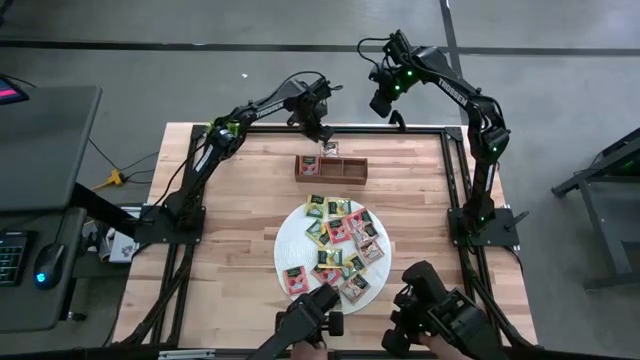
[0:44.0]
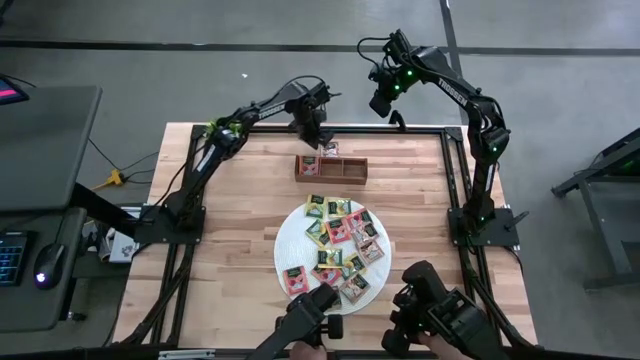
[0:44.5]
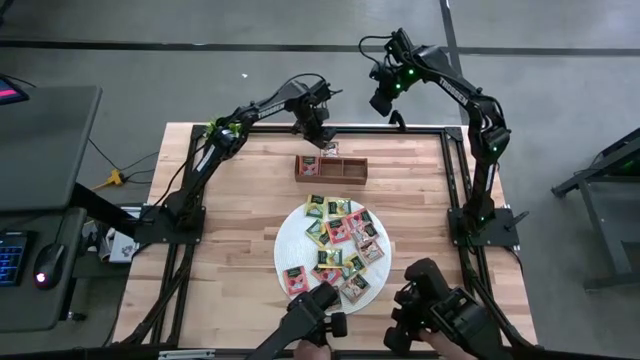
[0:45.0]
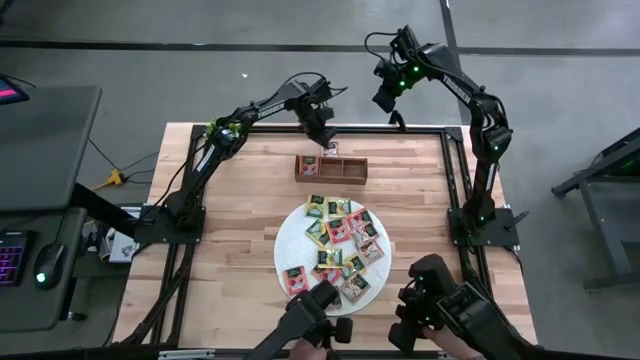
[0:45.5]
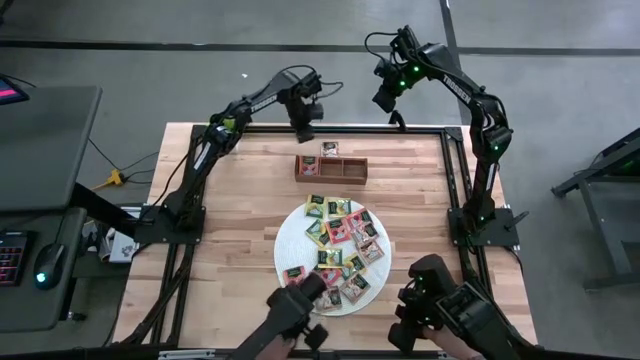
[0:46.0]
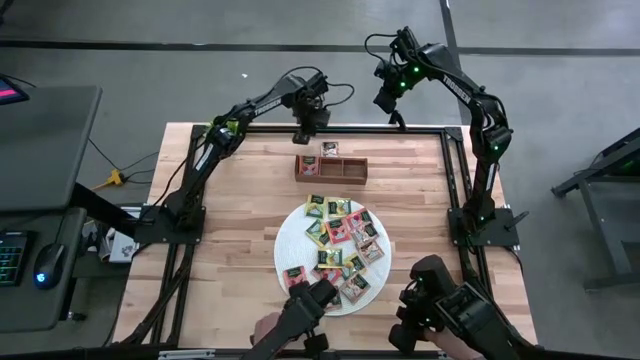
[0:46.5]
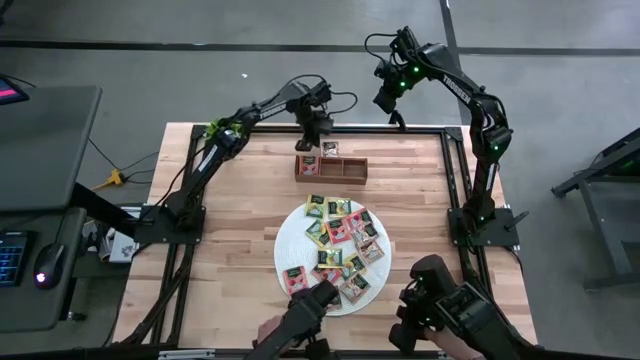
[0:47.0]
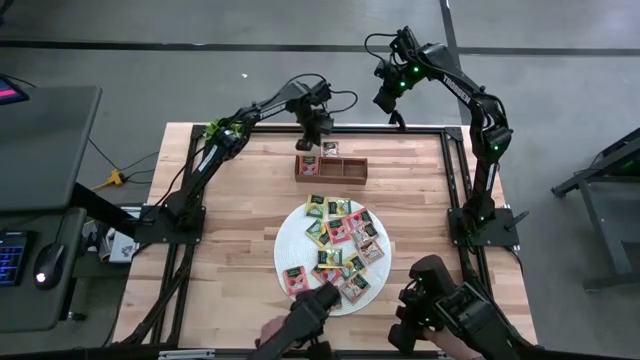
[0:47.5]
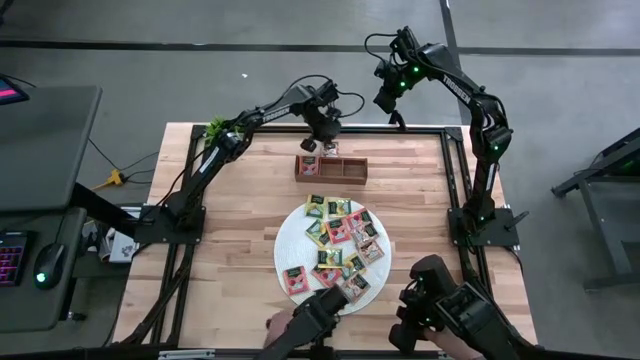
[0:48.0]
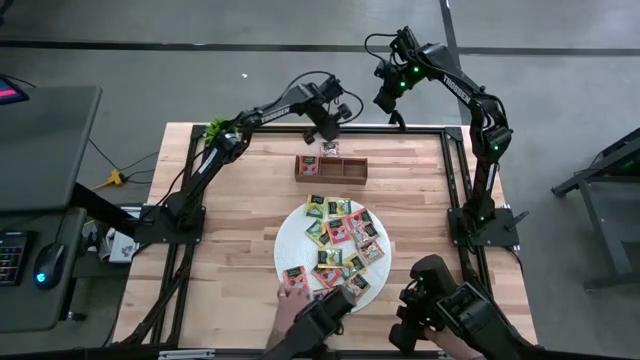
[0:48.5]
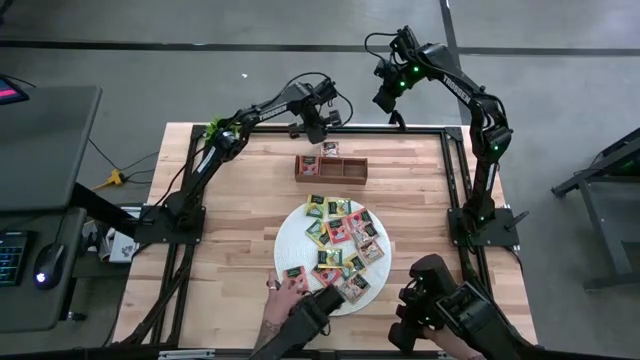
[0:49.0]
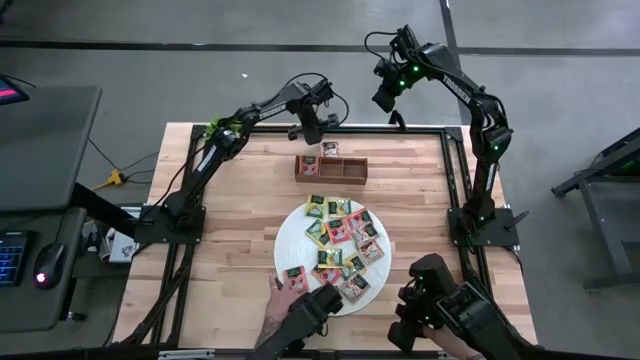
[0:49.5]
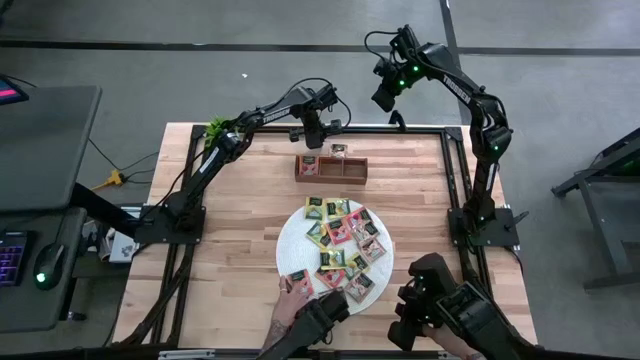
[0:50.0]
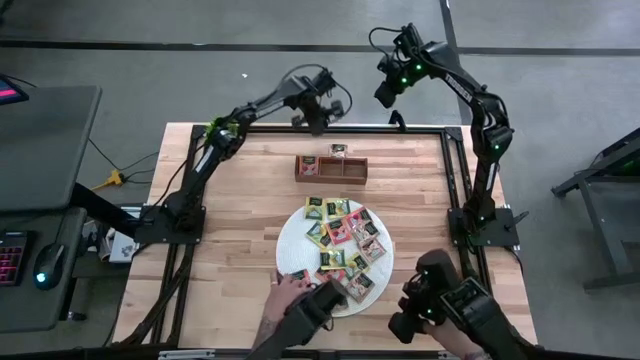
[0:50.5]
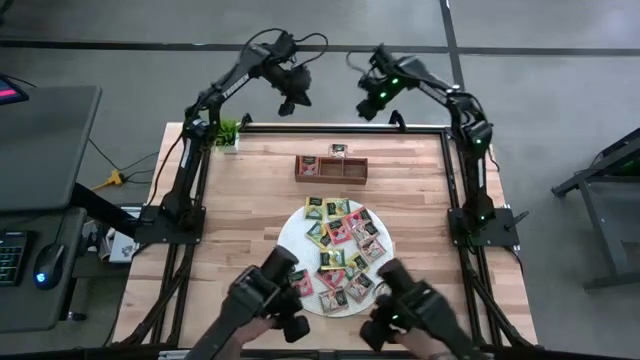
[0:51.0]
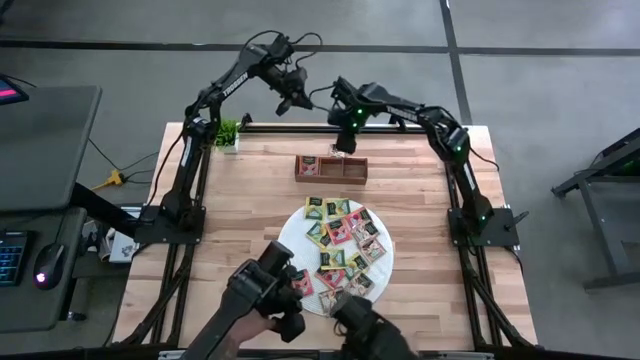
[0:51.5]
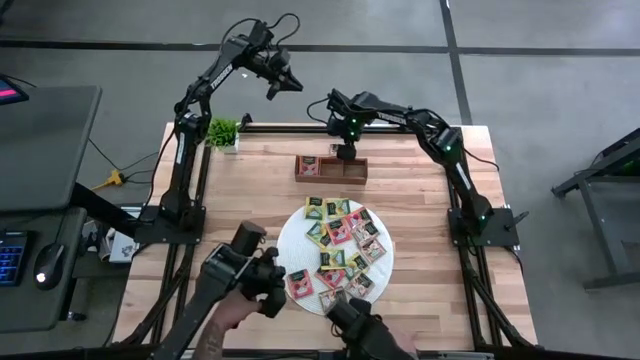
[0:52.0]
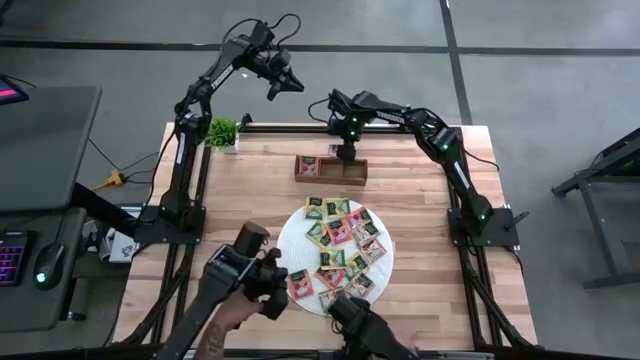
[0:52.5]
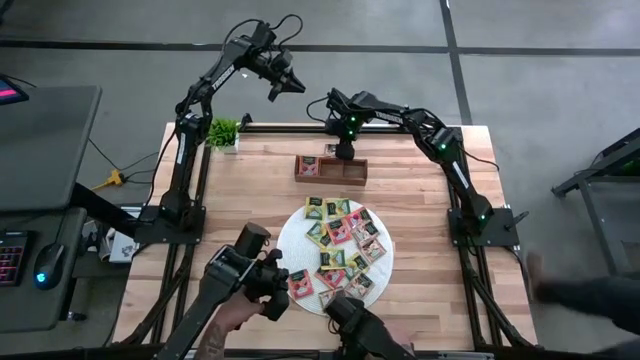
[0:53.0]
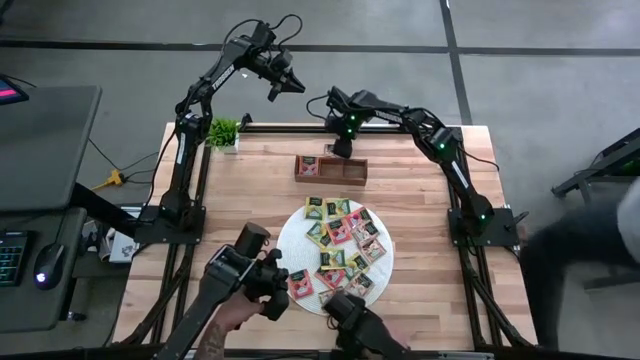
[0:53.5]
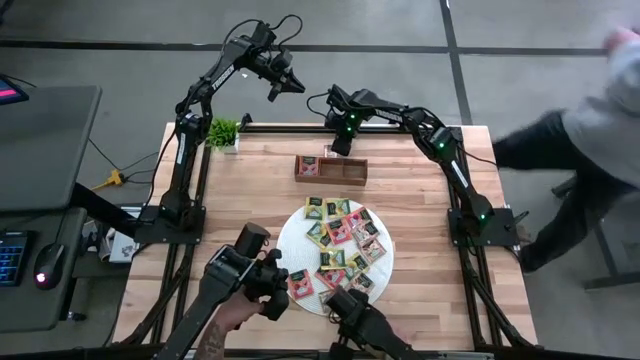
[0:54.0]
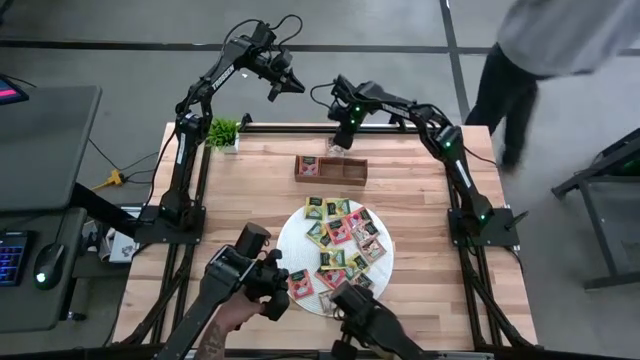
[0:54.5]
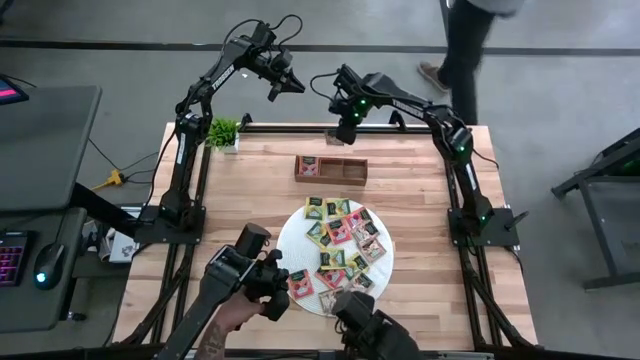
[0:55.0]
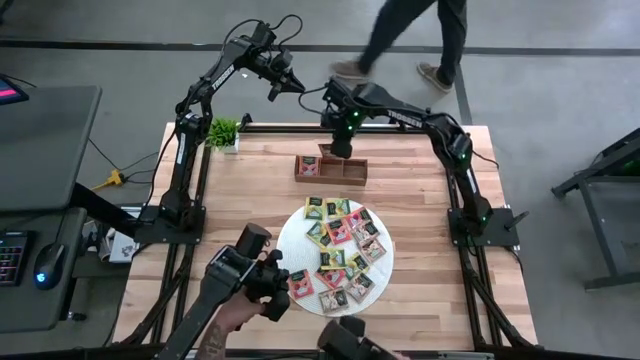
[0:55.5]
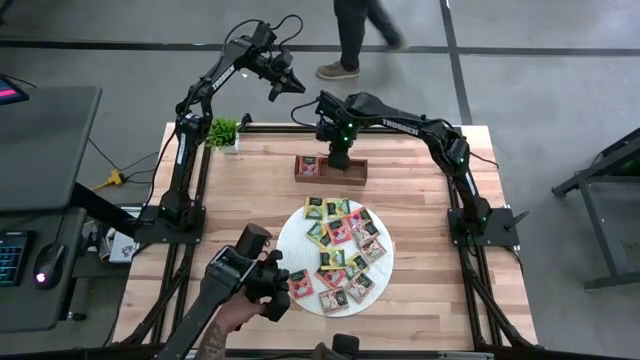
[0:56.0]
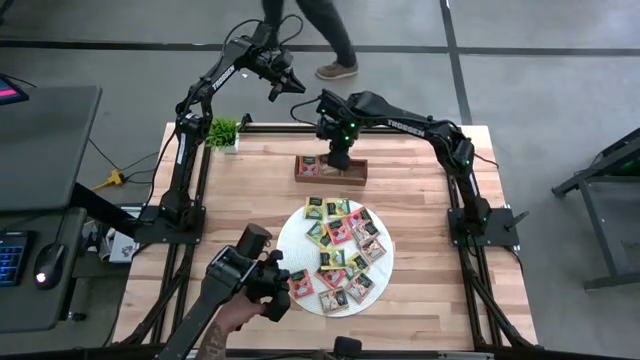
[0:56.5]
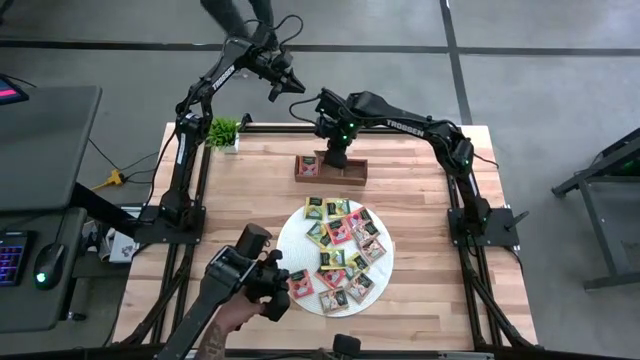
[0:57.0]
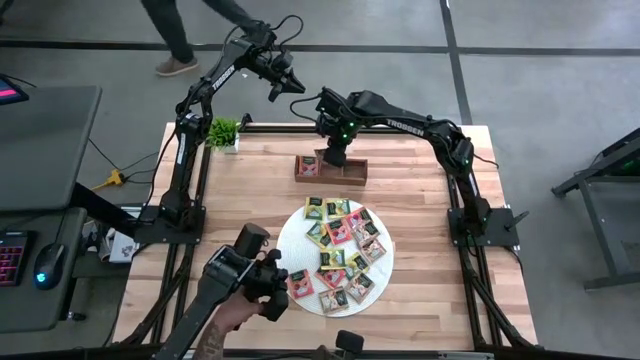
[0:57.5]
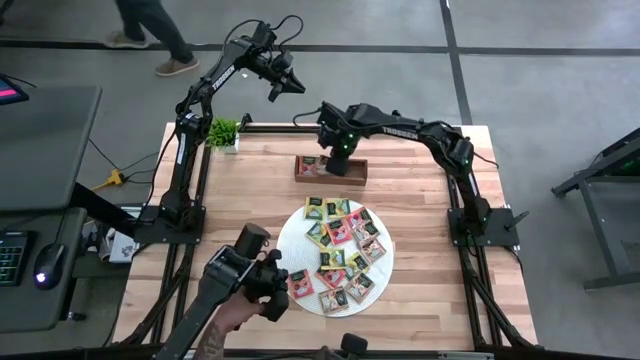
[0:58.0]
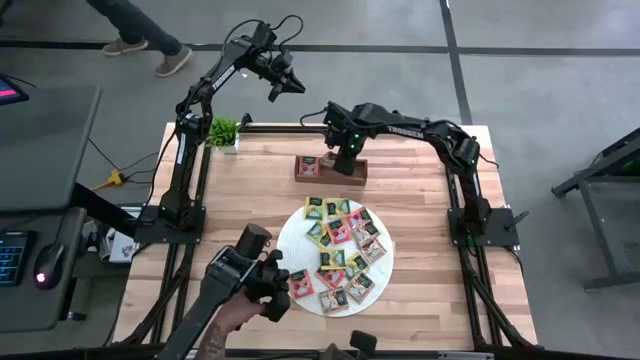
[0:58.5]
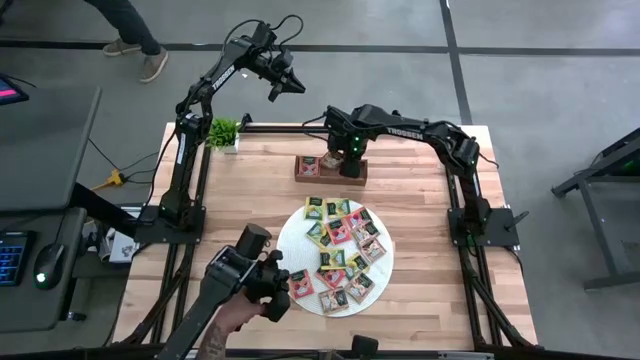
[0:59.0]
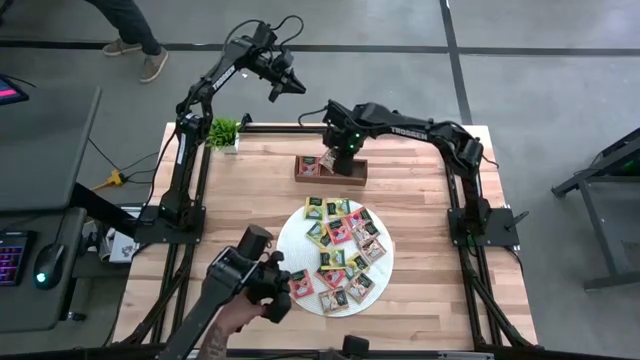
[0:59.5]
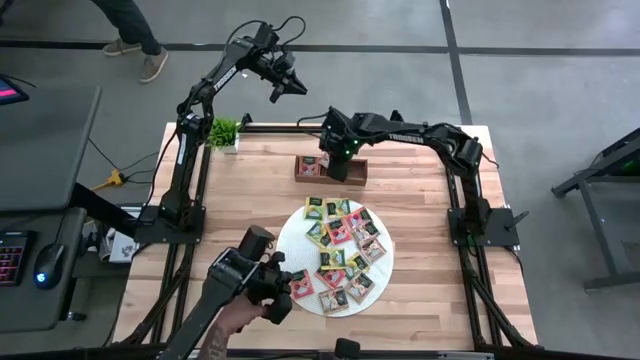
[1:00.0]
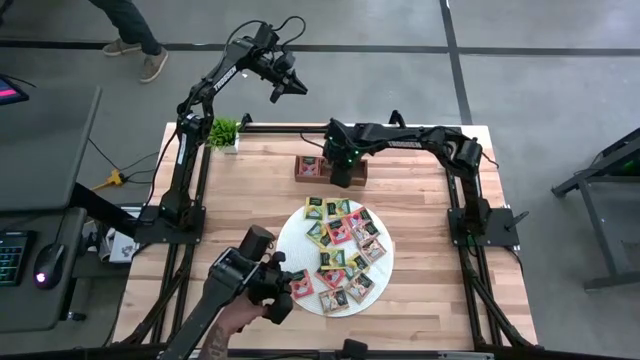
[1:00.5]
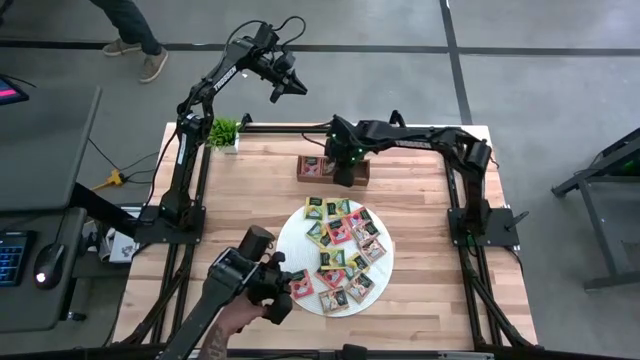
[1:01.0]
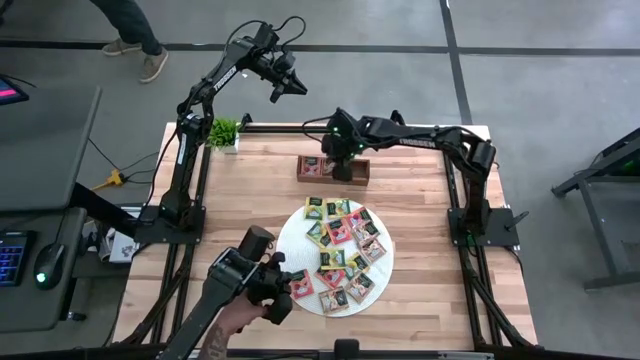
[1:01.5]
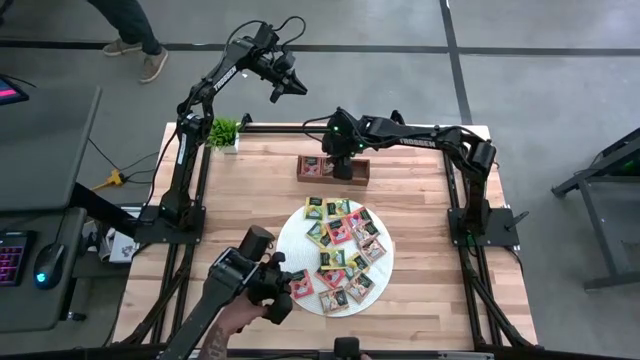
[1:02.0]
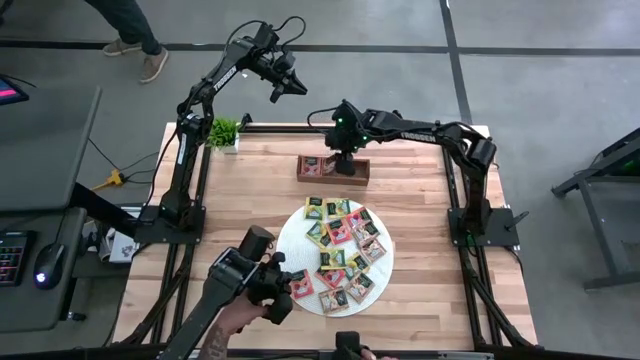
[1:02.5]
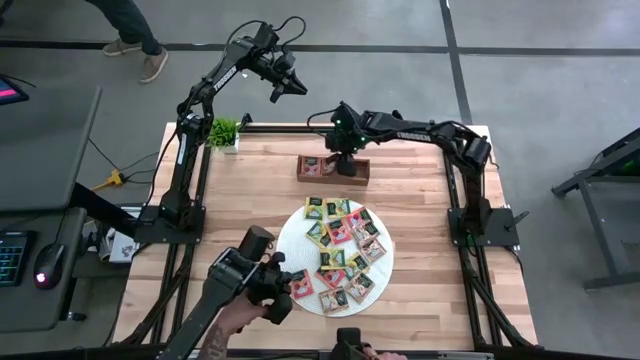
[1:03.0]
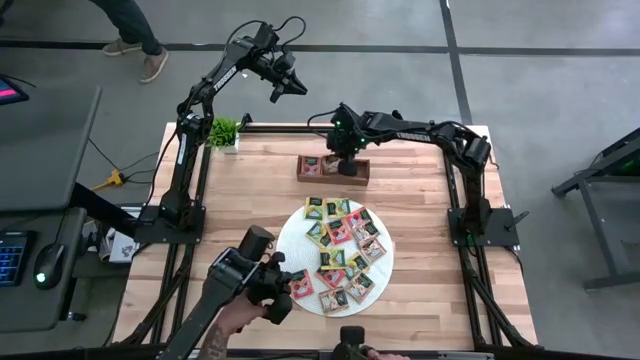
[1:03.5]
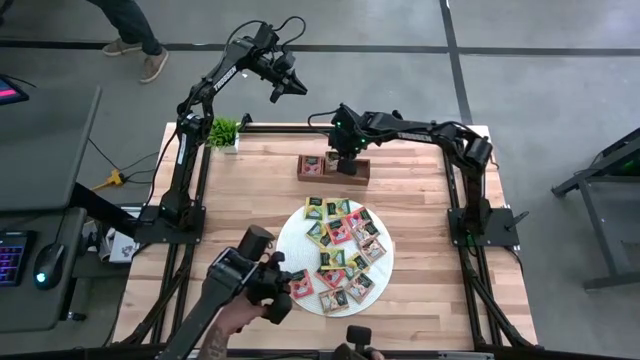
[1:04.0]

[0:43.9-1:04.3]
Task: Pick & Place Tea
Put the brown tea bag into the middle section of the wooden organizer
